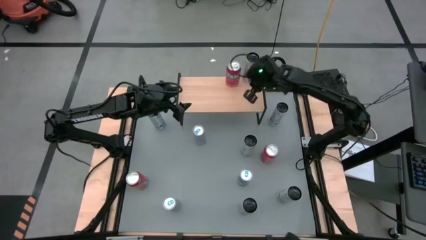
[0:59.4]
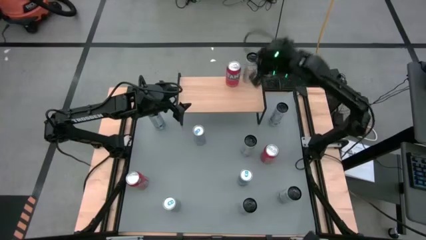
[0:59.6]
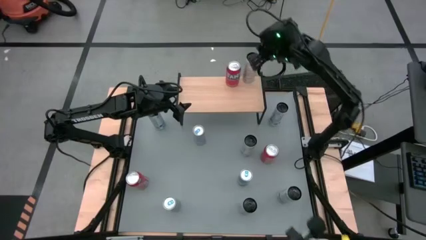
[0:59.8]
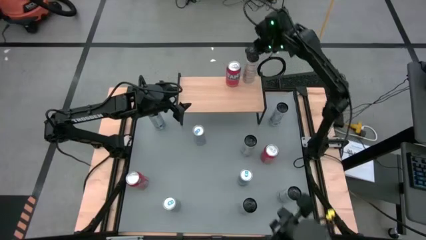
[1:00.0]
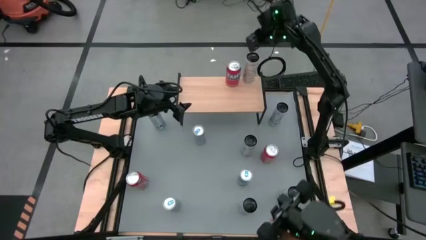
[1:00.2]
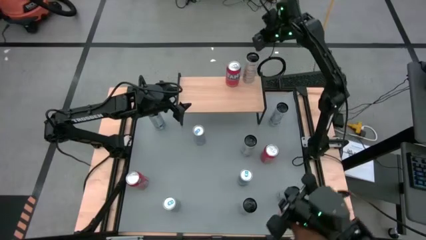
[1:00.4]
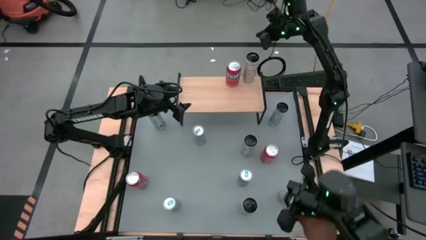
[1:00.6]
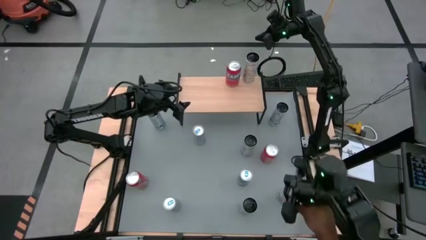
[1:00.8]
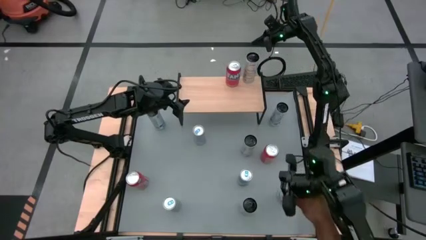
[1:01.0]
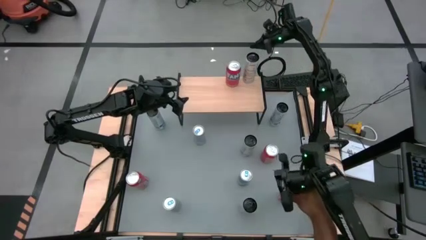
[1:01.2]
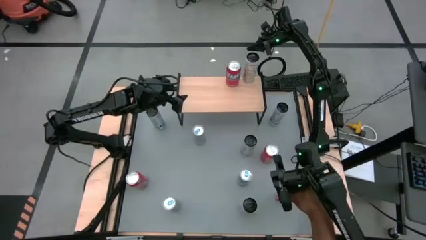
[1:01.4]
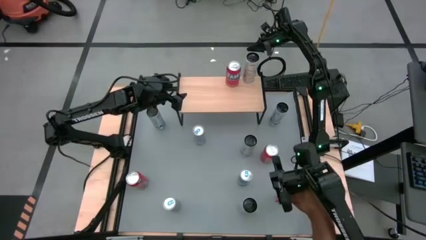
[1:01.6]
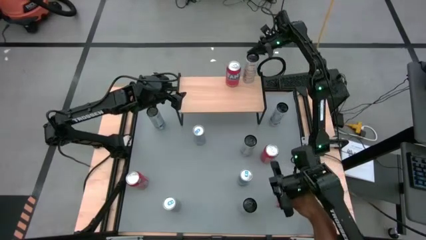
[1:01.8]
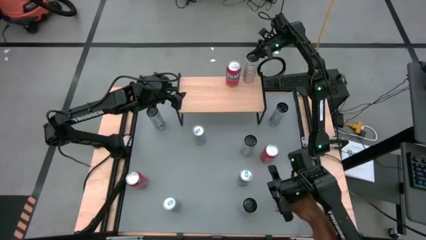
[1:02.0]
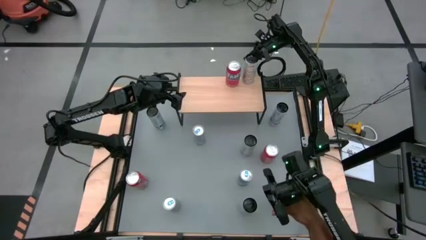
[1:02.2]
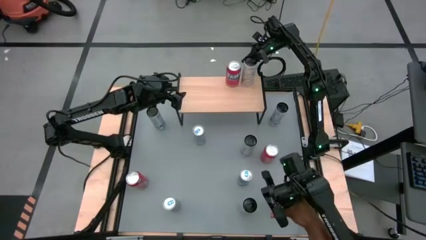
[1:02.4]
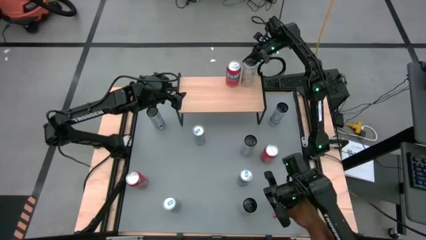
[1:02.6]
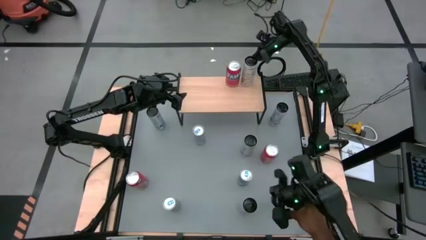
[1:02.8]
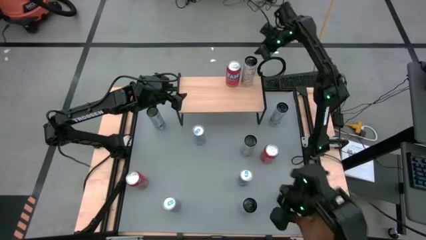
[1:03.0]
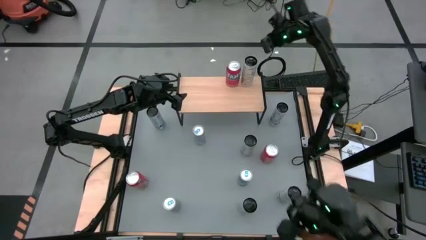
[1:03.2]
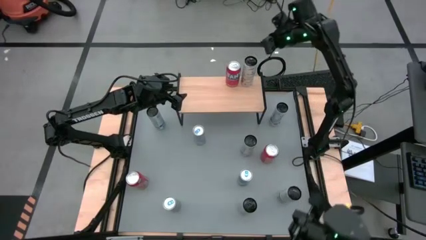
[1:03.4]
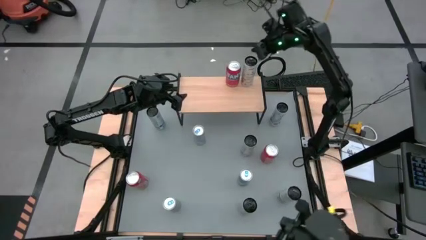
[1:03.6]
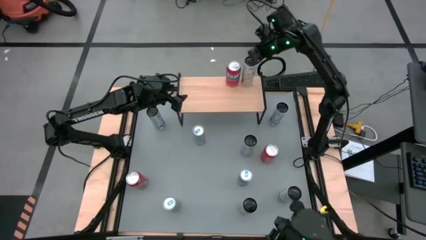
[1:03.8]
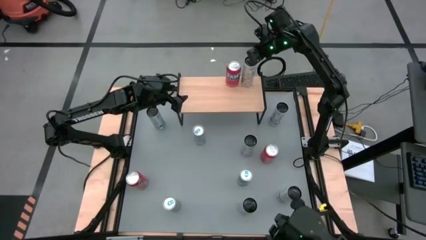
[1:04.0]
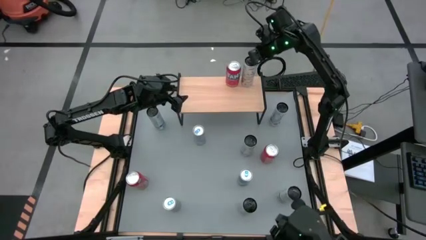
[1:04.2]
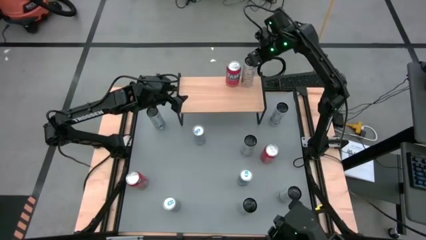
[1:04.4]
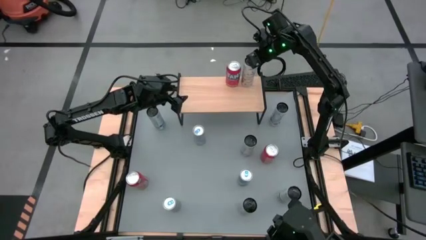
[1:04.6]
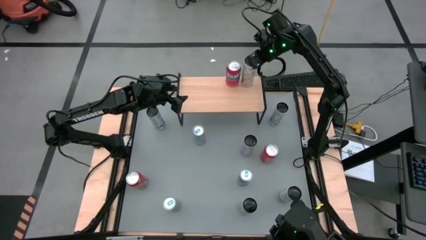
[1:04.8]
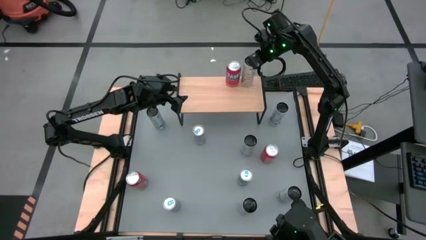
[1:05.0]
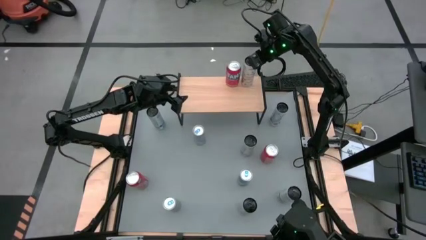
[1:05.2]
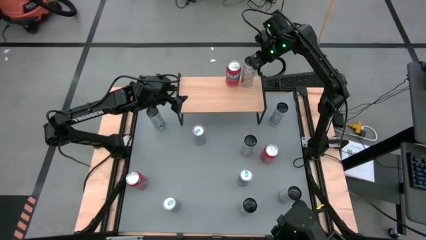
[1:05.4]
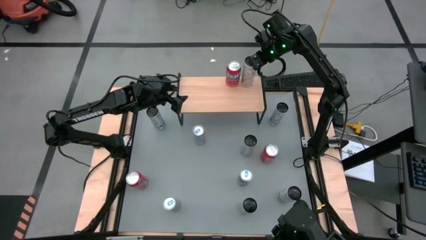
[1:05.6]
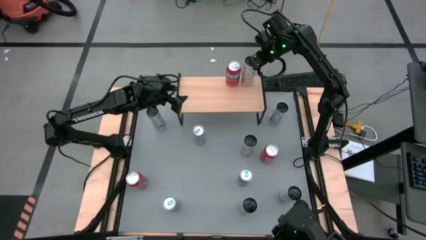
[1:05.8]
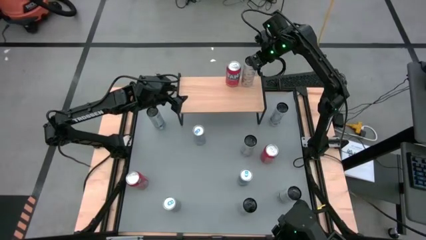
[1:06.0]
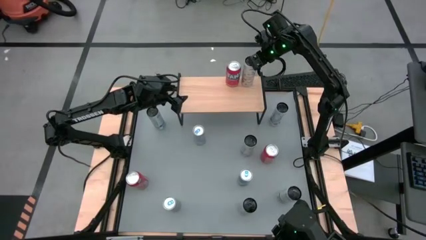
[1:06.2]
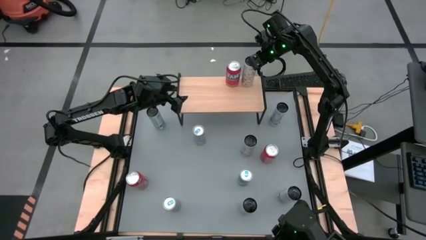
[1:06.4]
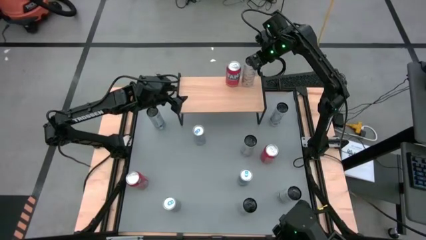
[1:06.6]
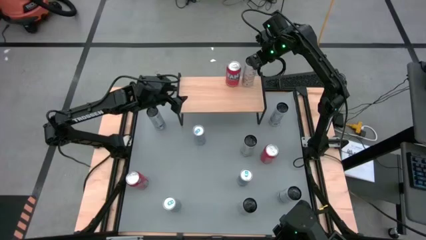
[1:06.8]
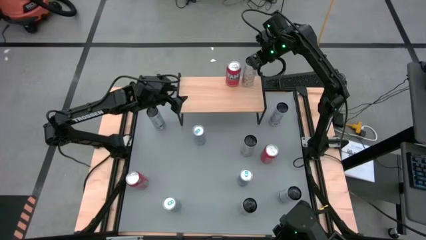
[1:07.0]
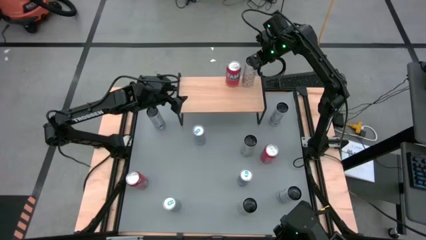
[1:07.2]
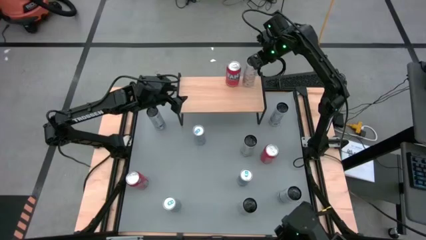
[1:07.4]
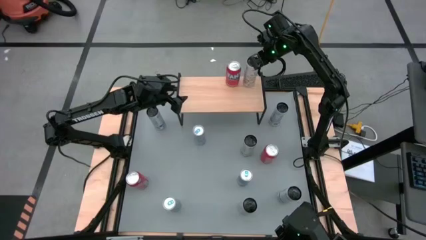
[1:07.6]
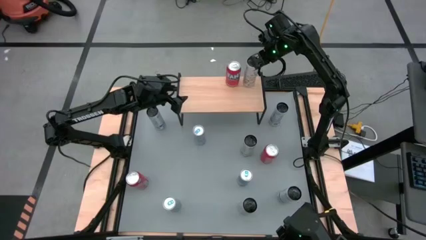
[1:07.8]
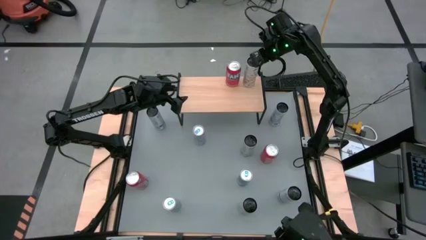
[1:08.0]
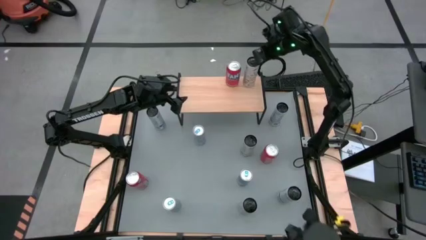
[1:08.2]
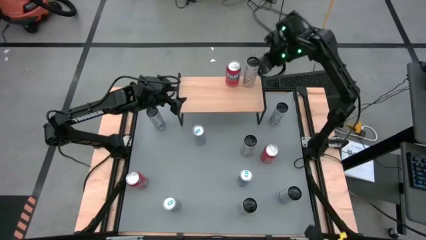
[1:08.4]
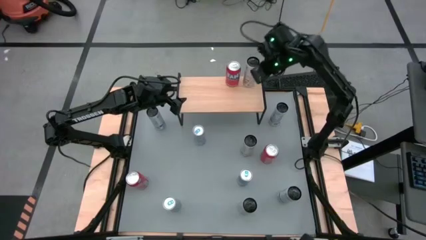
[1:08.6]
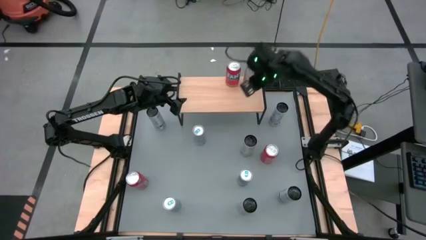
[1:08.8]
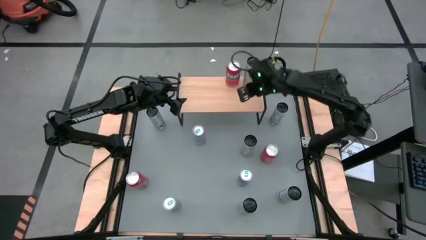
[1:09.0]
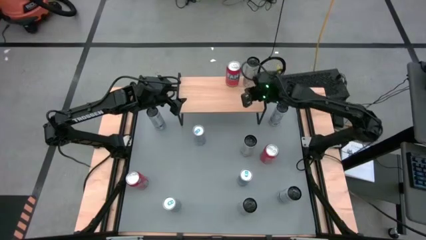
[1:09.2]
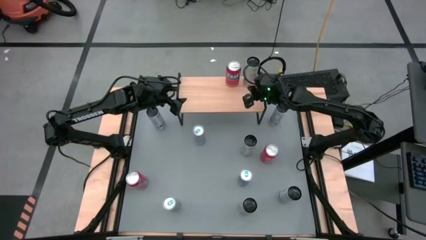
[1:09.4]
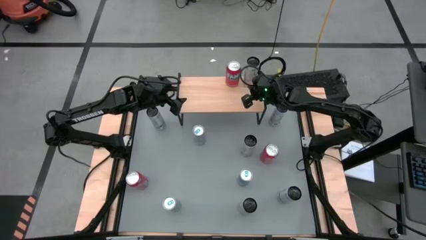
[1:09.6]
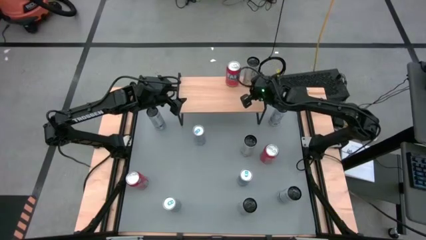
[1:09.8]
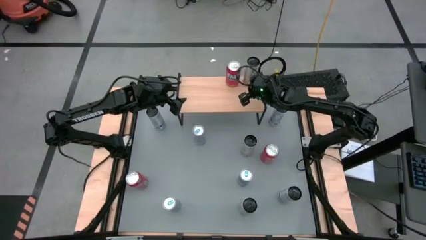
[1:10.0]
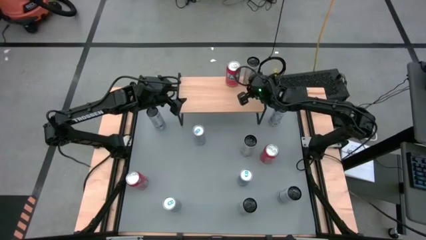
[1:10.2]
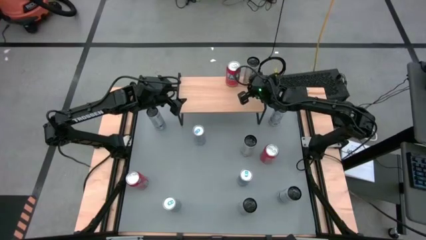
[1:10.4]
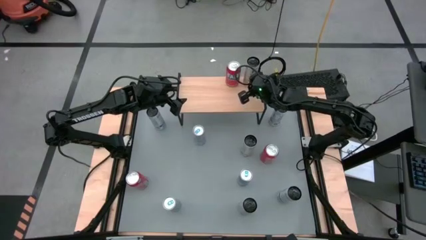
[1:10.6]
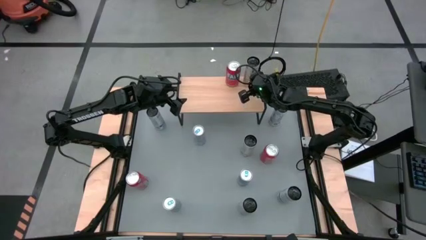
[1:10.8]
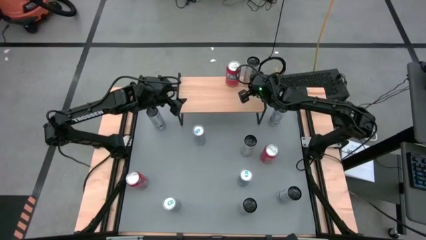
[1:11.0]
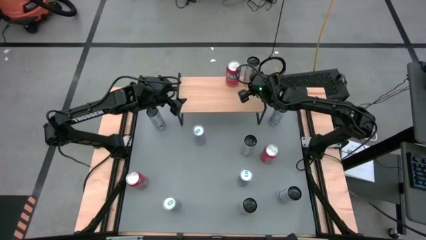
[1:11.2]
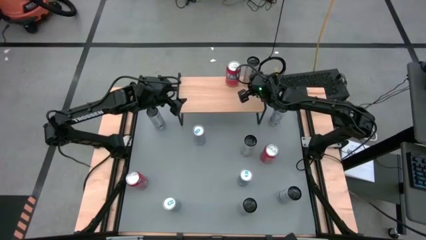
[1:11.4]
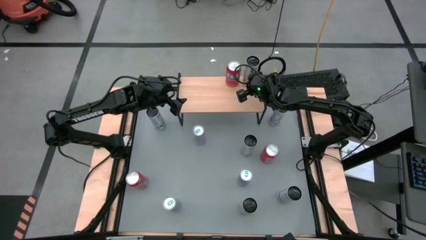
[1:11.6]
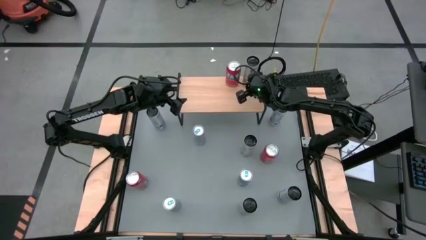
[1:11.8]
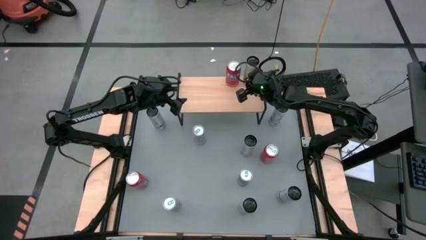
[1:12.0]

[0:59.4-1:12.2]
Task: Place canned beverage on shelf
Adjust the yellow soda can on the shelf

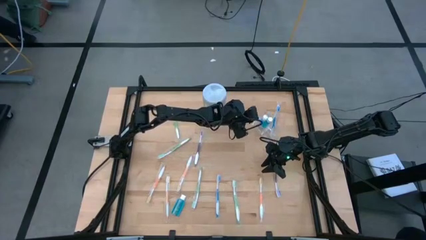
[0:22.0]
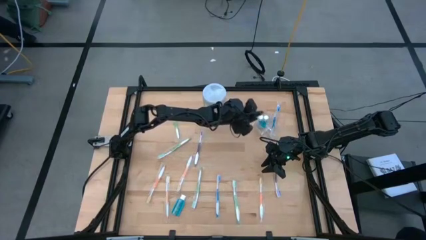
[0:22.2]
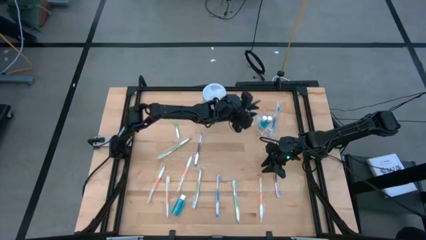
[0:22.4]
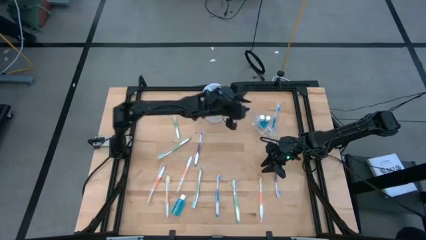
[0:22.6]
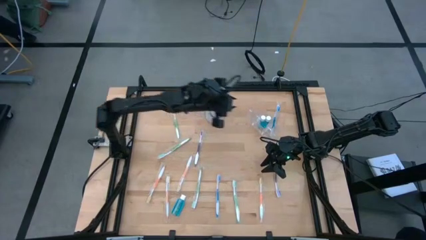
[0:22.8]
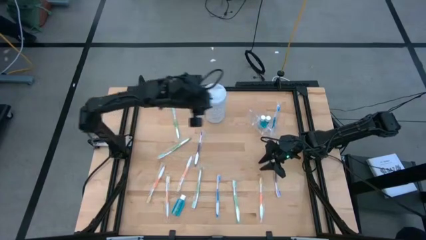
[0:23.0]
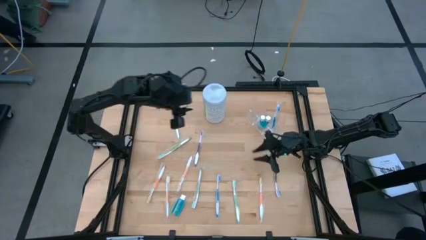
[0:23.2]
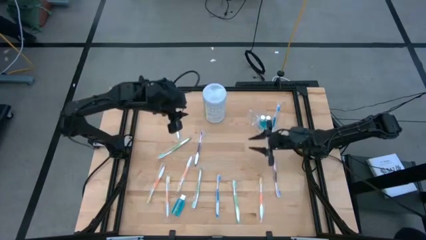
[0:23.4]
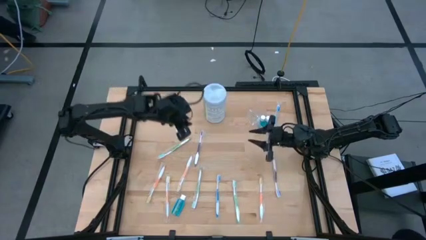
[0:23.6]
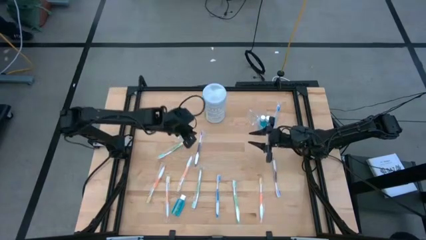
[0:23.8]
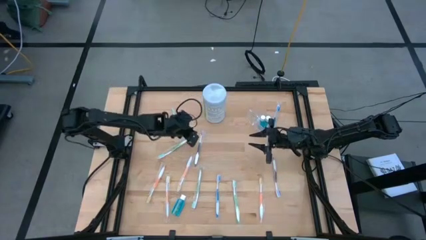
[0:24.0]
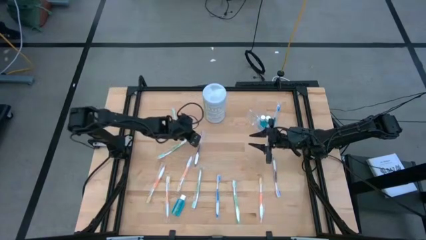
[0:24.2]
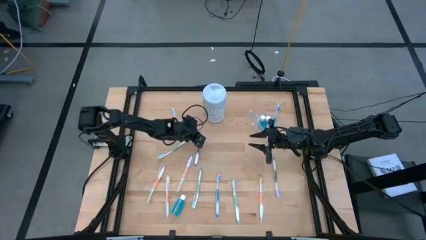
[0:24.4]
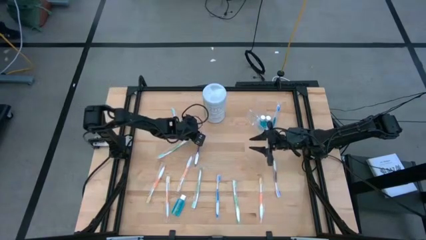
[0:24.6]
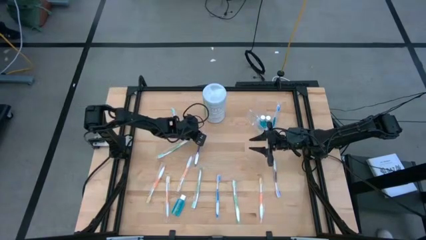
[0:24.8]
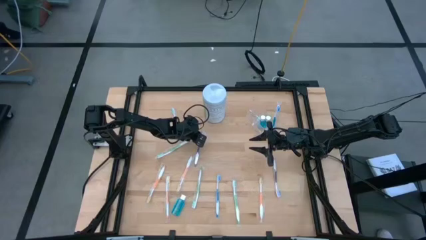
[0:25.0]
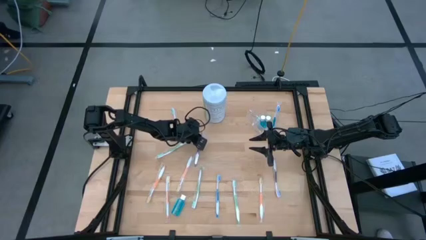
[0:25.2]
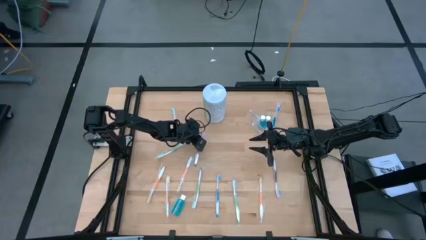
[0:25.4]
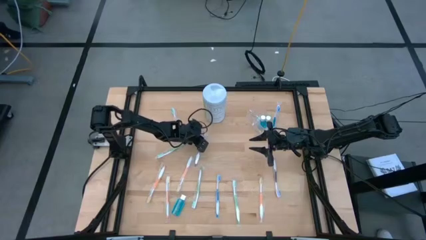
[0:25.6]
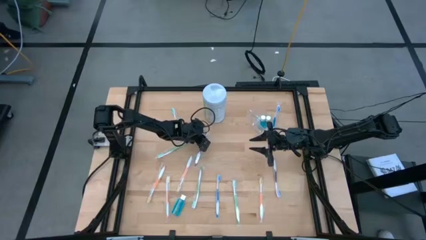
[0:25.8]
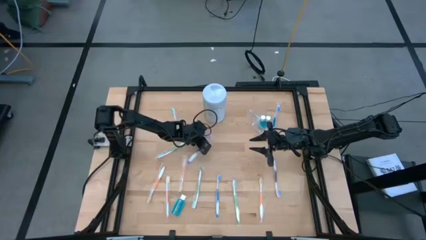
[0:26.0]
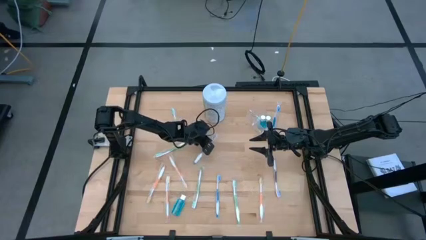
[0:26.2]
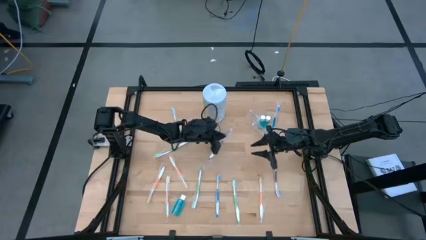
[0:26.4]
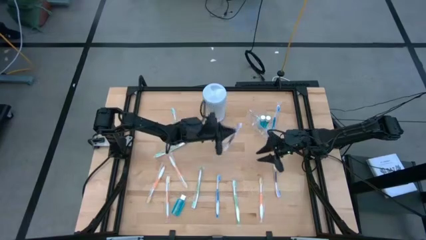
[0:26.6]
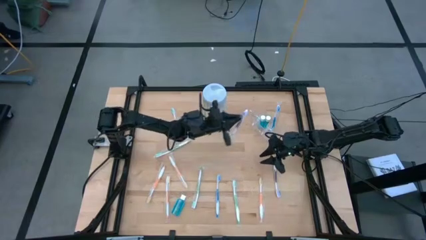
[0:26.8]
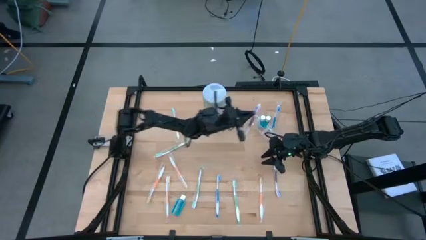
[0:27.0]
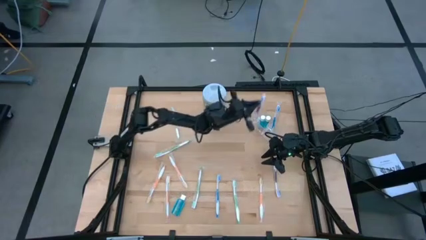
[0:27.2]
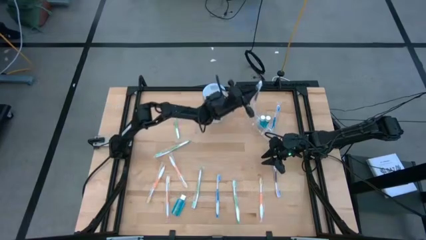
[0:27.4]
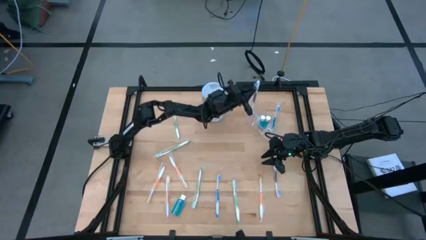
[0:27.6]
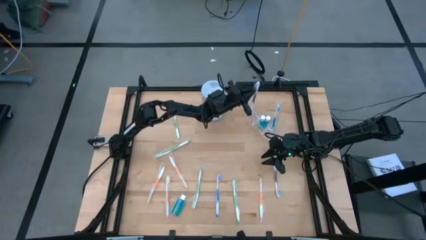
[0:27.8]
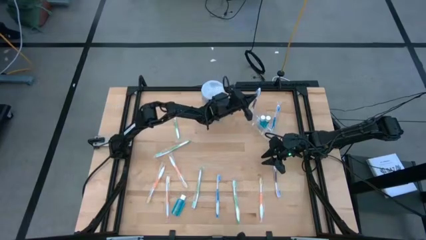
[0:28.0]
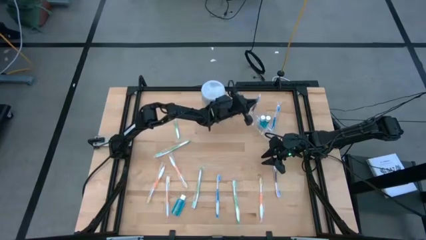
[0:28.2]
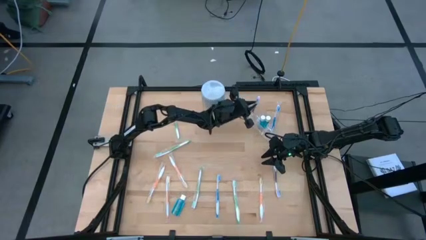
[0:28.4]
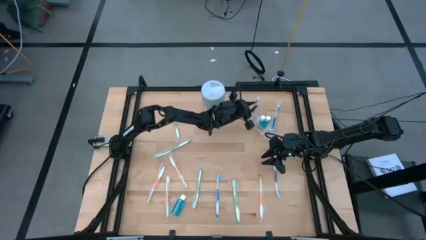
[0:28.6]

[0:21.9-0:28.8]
Task: Pick & Place toothbrushing station
Put the purple toothbrush into the transparent organizer
